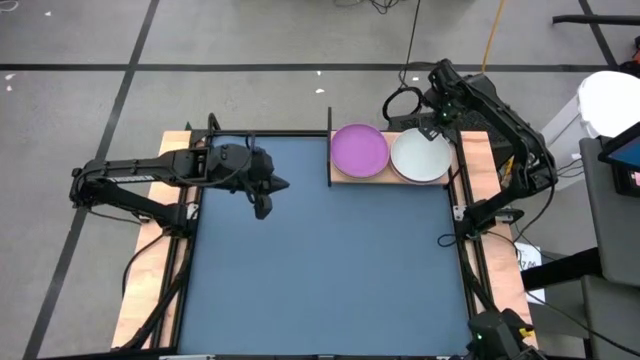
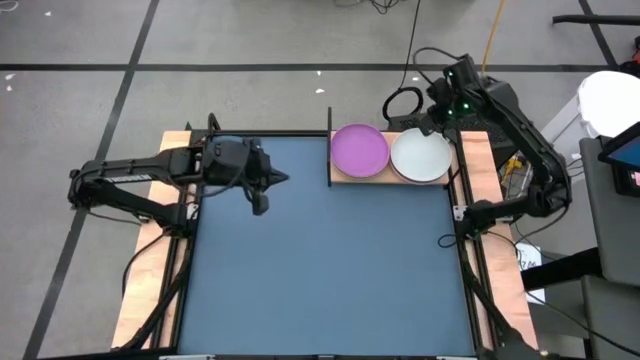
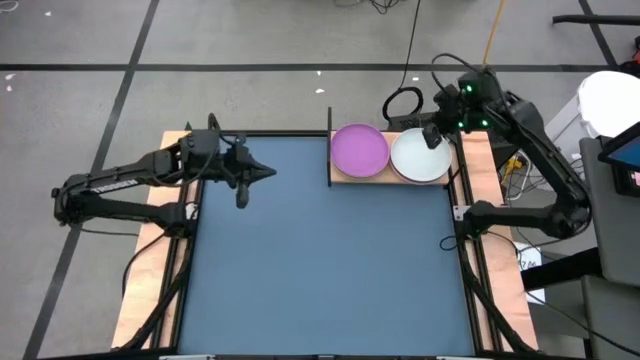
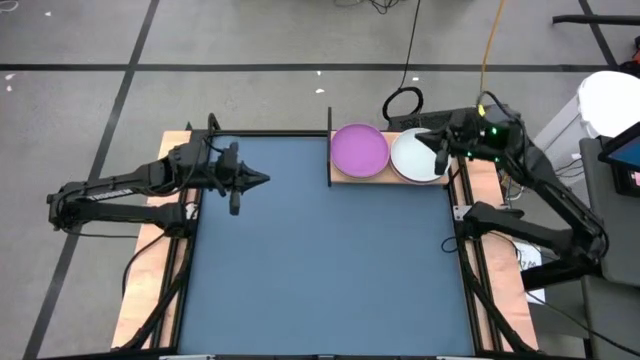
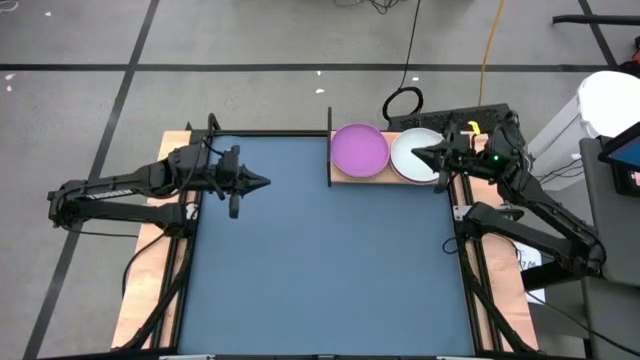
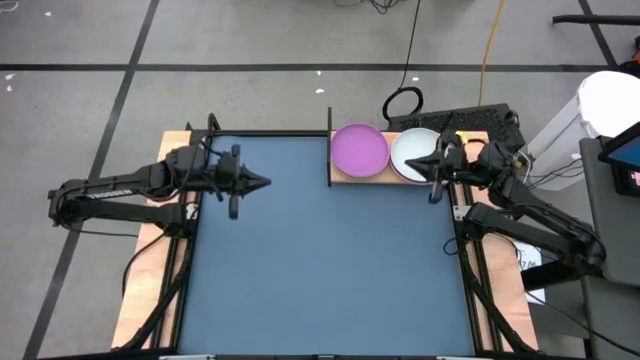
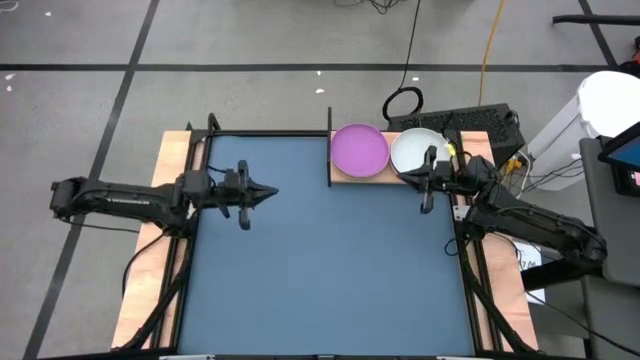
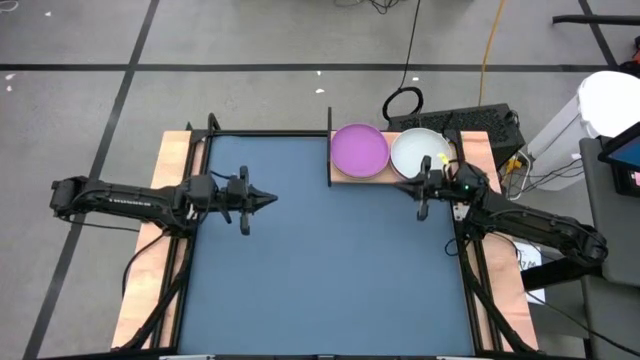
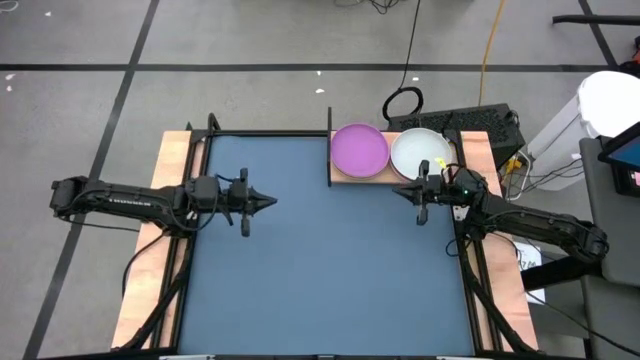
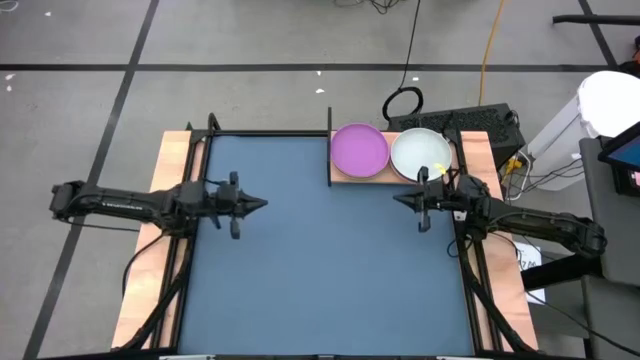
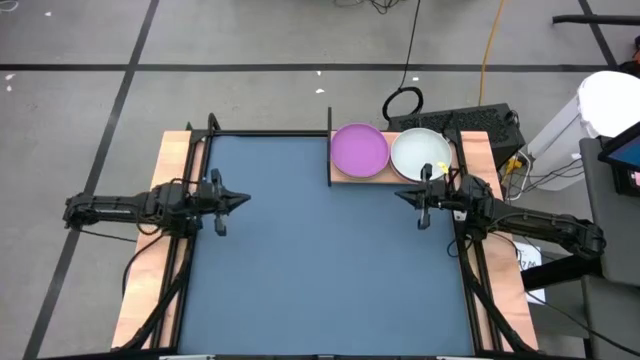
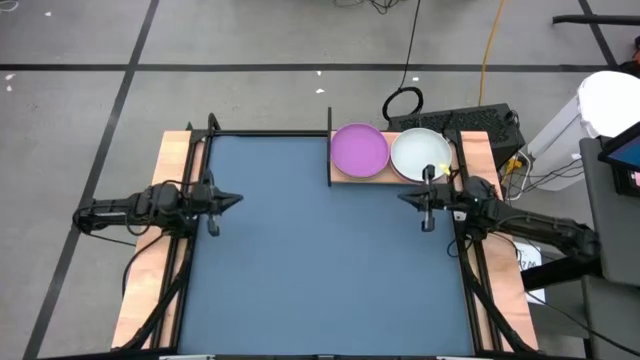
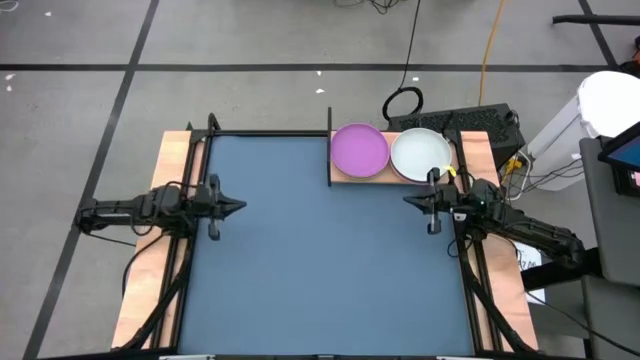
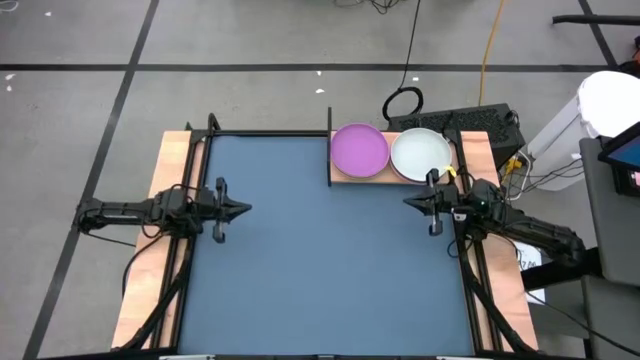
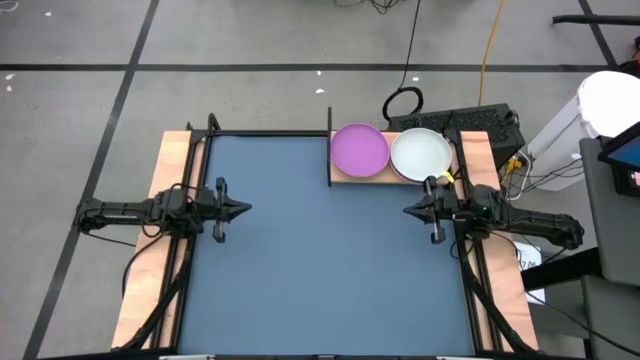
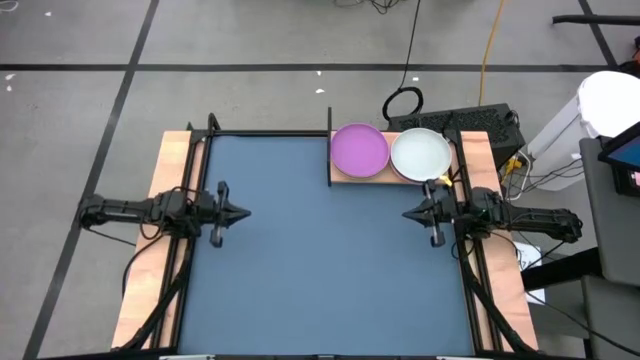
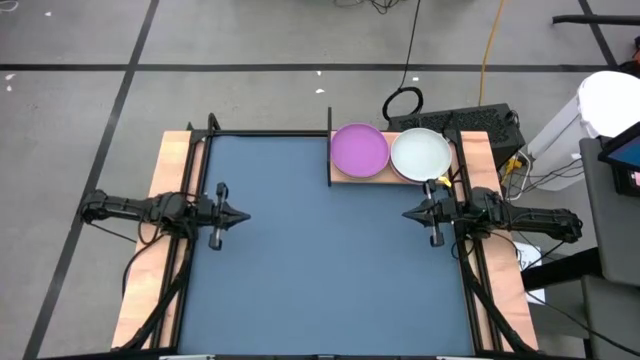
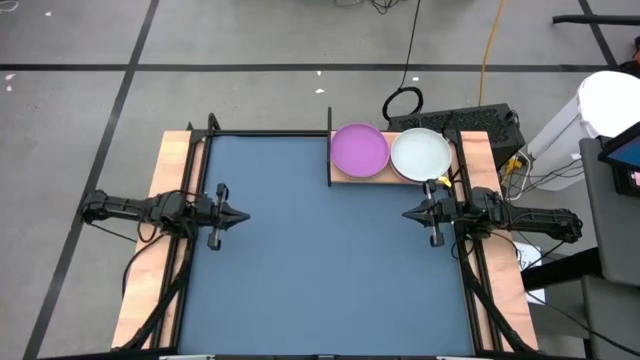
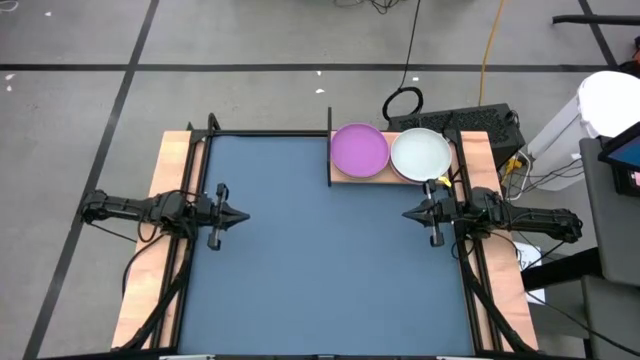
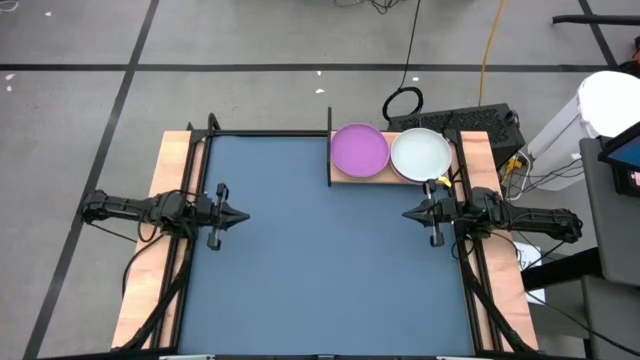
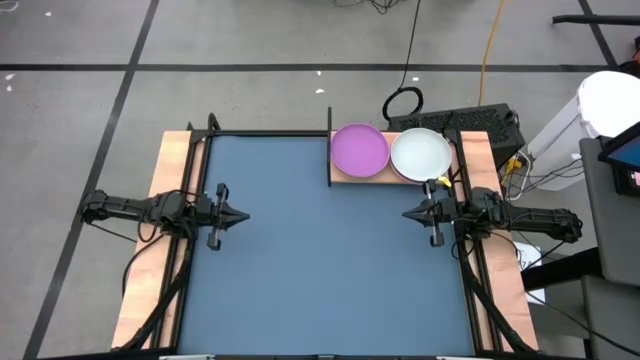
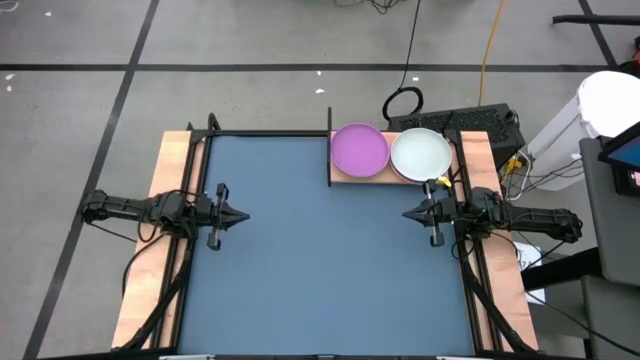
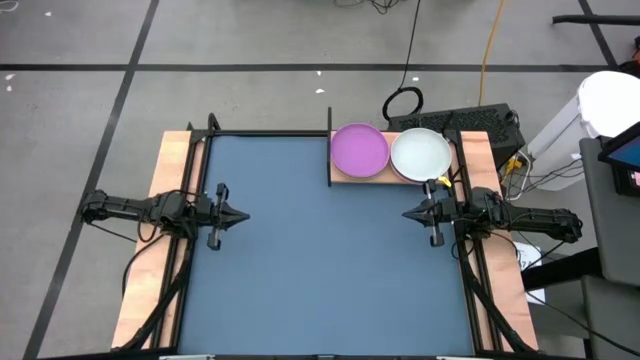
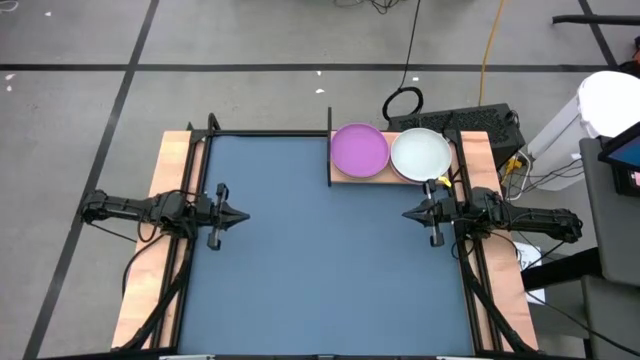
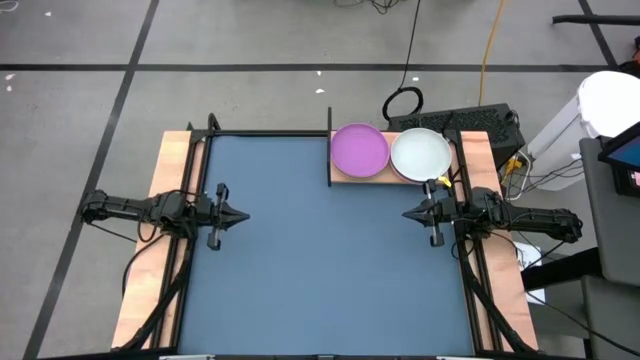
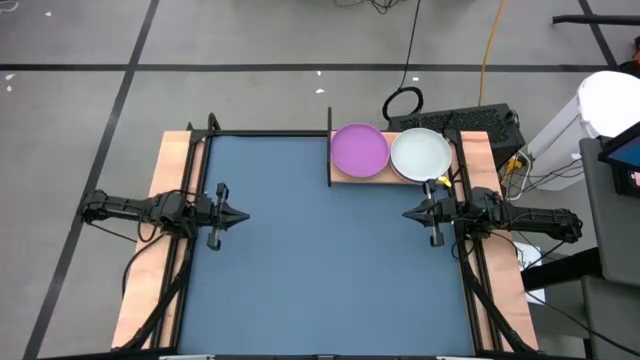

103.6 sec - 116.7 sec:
Task: Place and stack plates onto a shelf
Return to Home Position

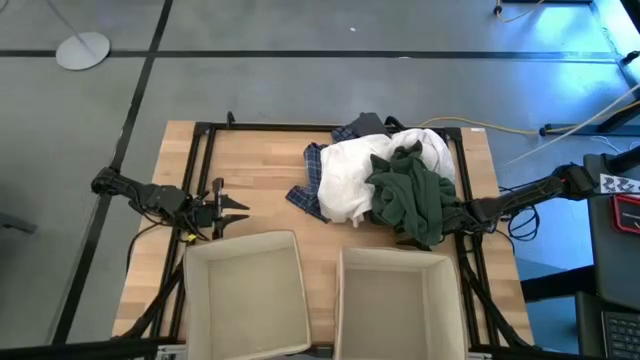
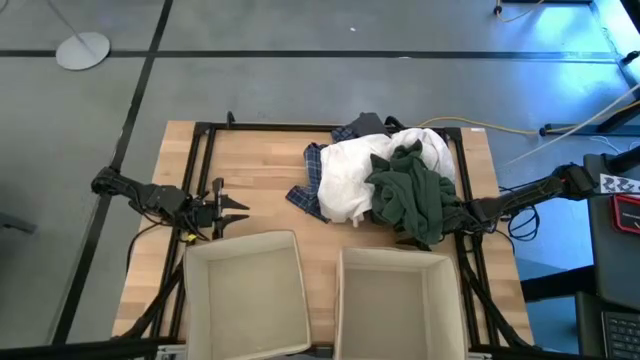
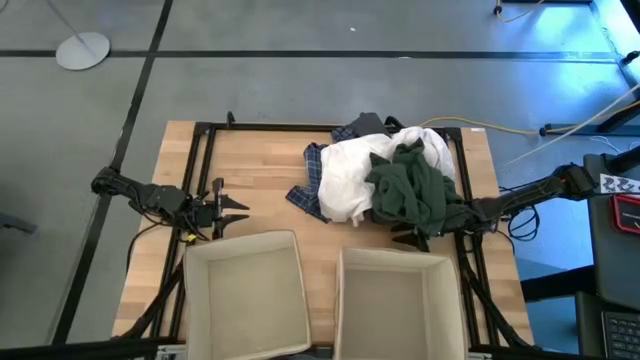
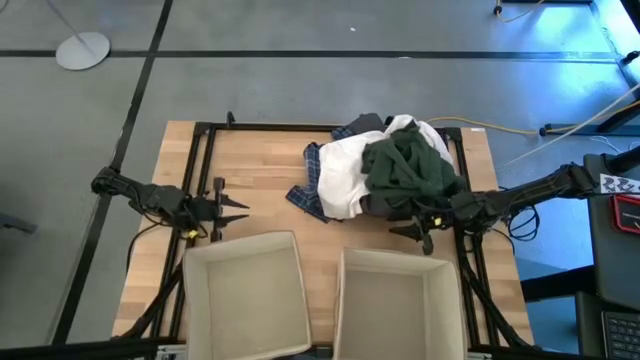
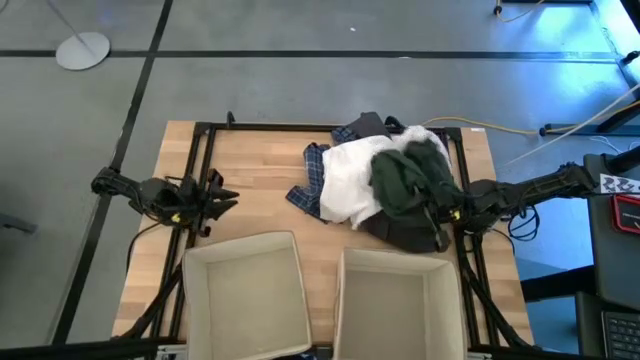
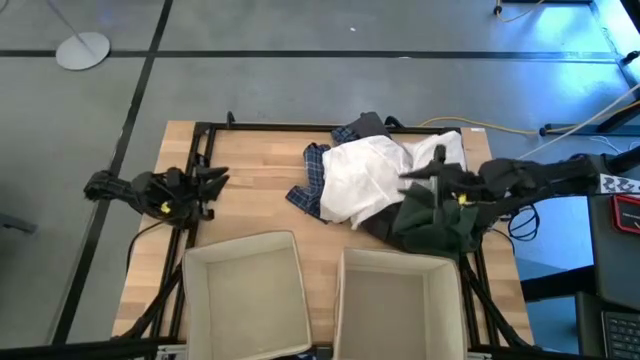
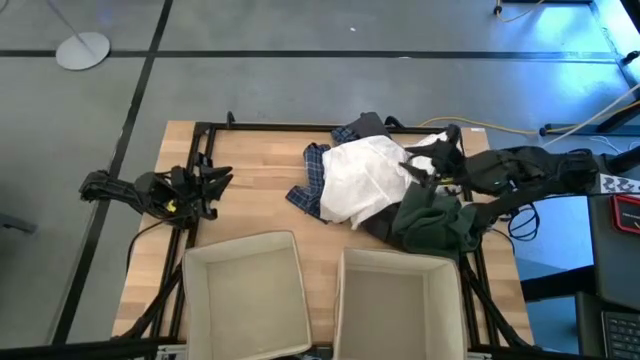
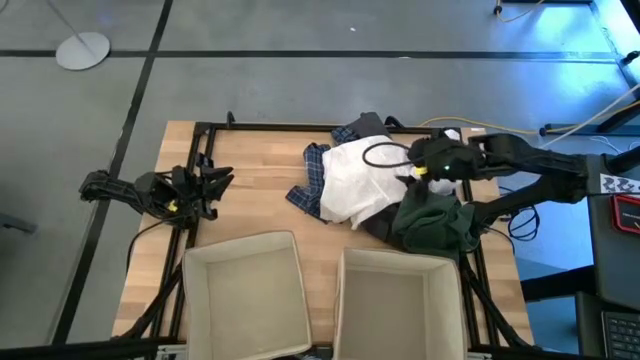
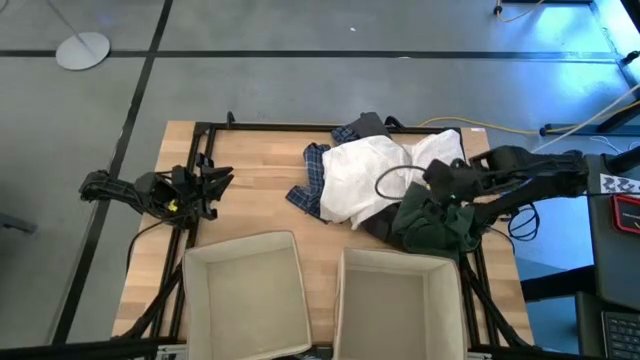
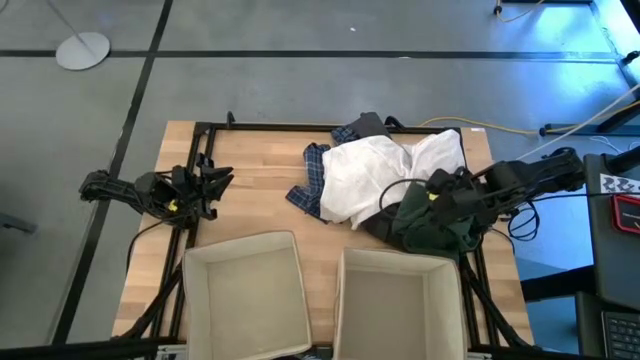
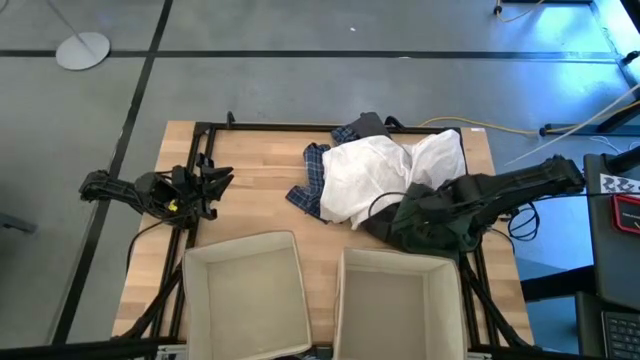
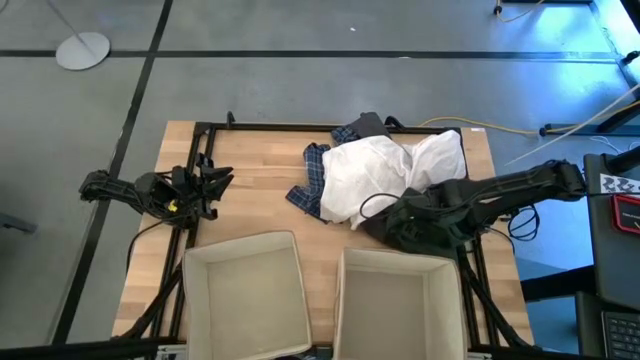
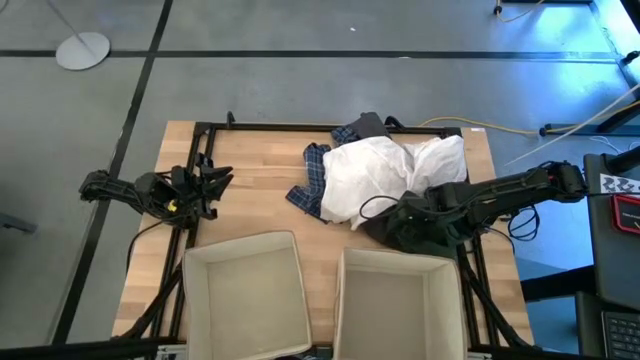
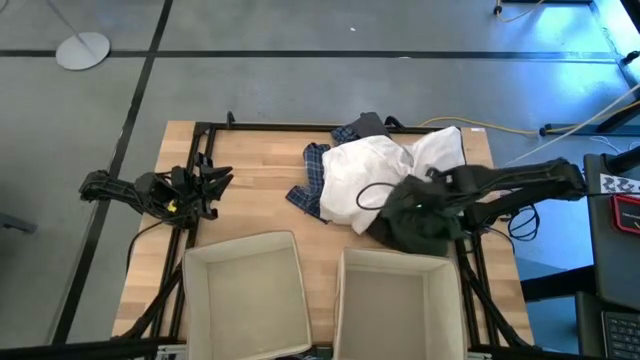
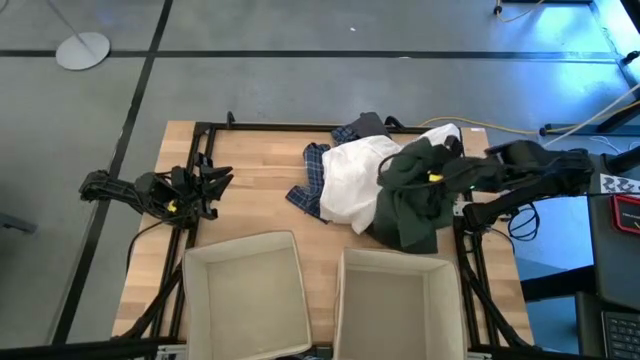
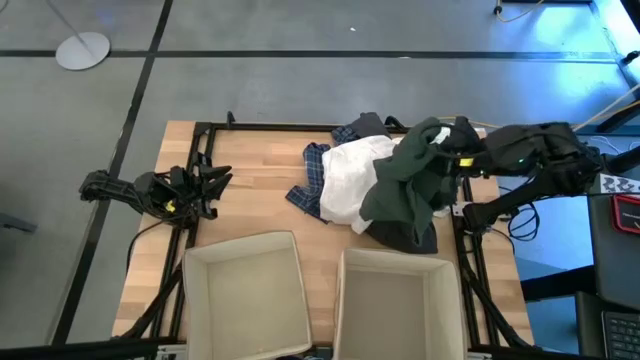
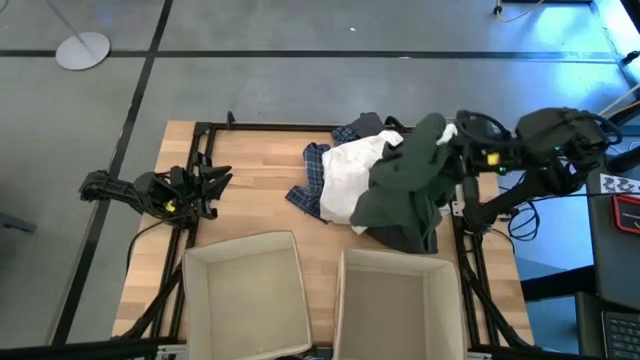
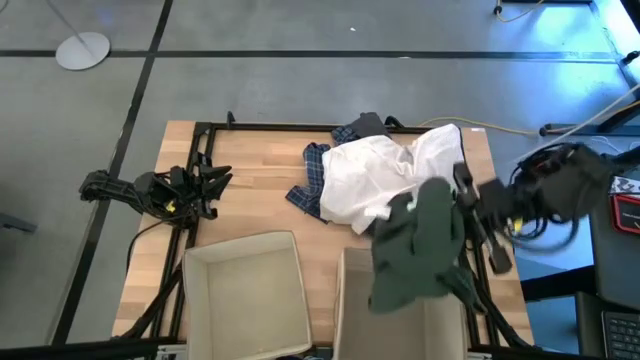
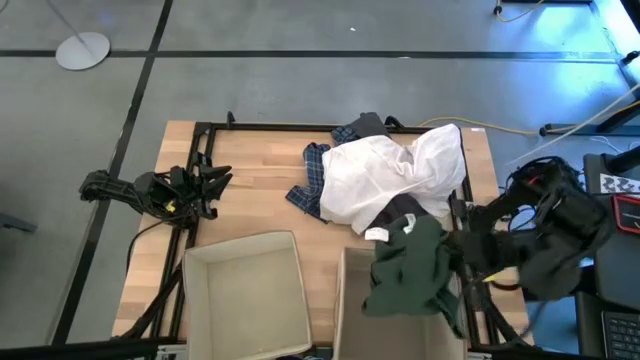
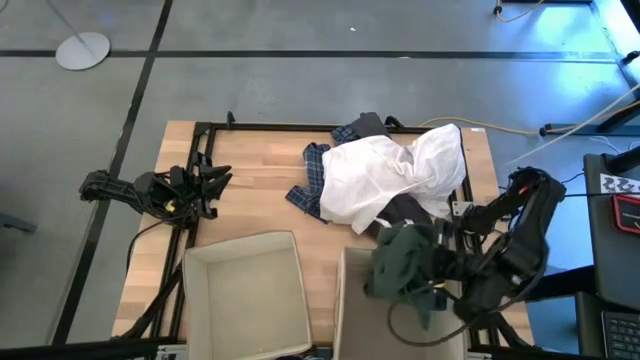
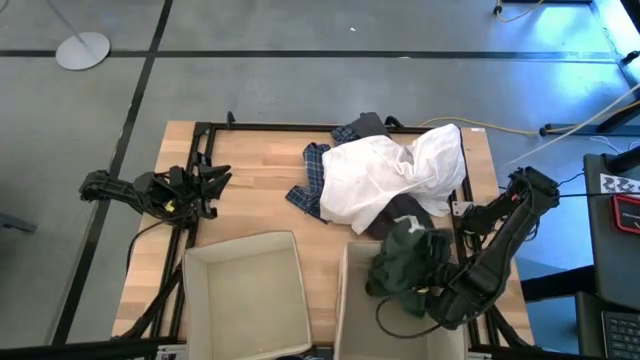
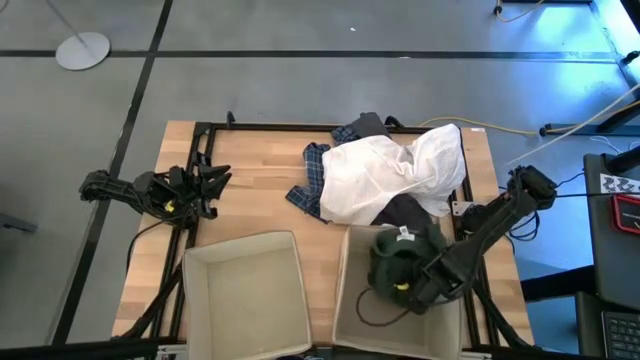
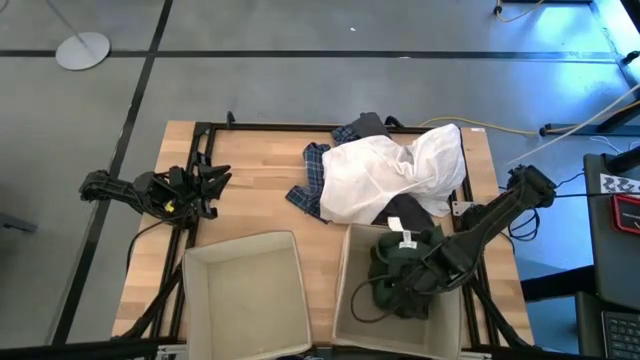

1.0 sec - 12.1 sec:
Task: Sort clothes
Put the green shirt into the right laundry organizer
